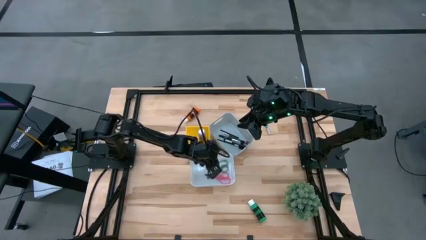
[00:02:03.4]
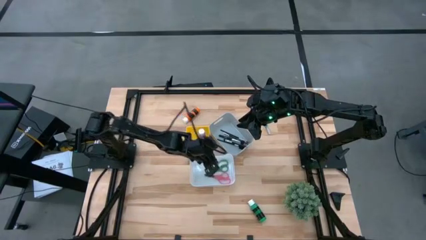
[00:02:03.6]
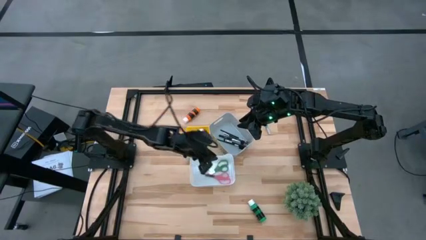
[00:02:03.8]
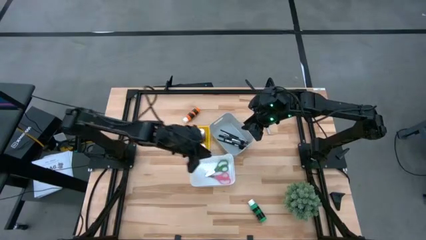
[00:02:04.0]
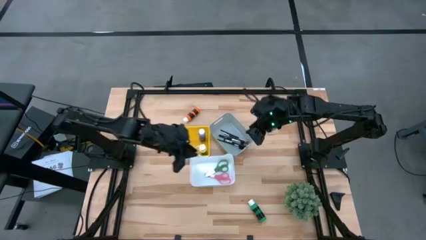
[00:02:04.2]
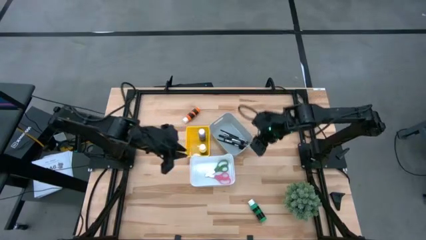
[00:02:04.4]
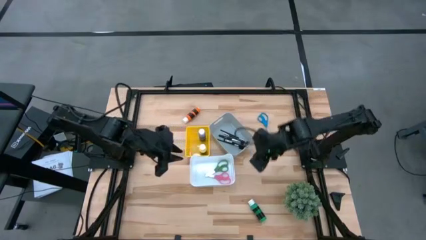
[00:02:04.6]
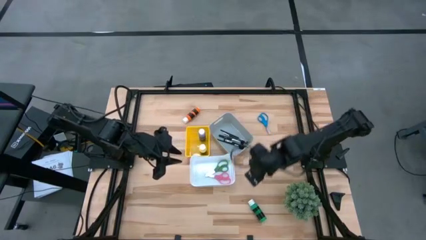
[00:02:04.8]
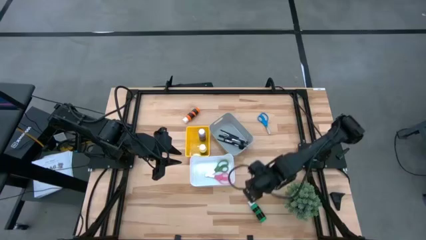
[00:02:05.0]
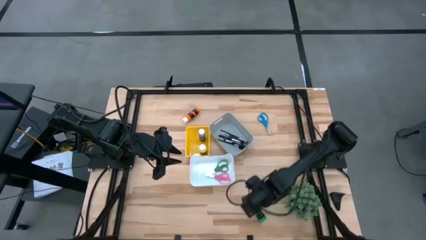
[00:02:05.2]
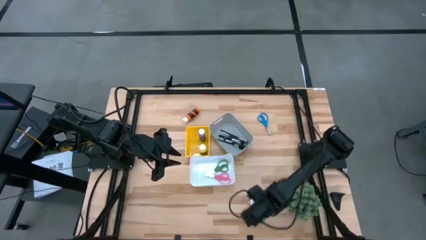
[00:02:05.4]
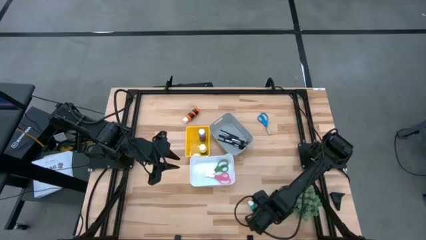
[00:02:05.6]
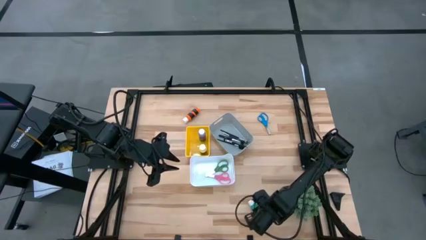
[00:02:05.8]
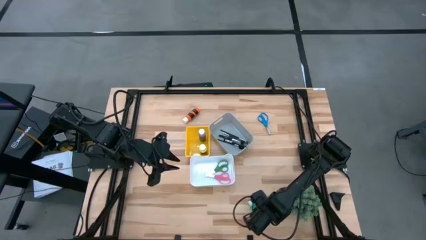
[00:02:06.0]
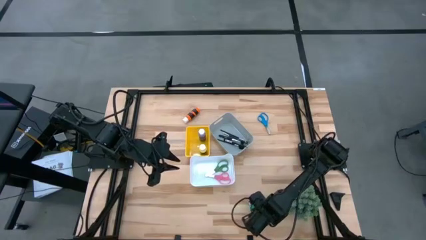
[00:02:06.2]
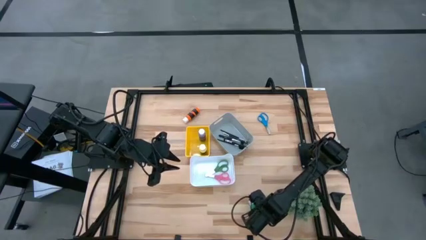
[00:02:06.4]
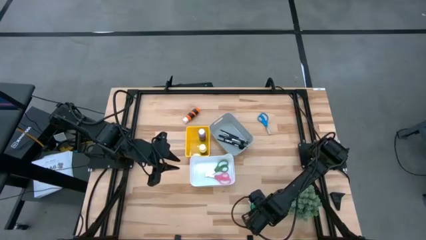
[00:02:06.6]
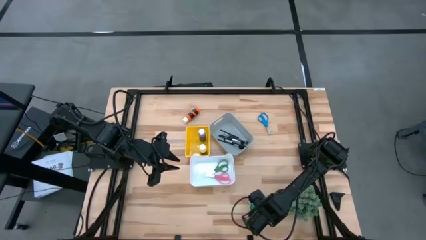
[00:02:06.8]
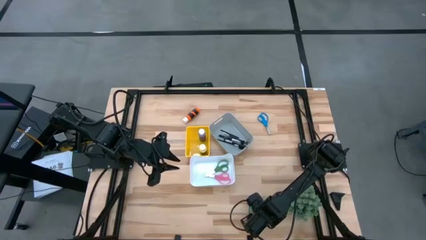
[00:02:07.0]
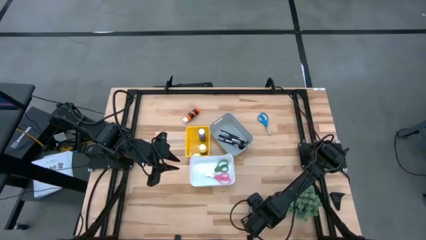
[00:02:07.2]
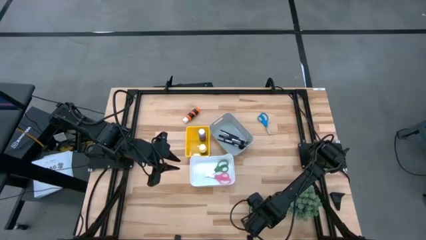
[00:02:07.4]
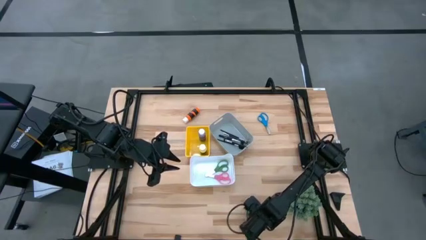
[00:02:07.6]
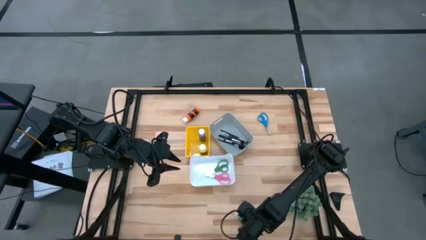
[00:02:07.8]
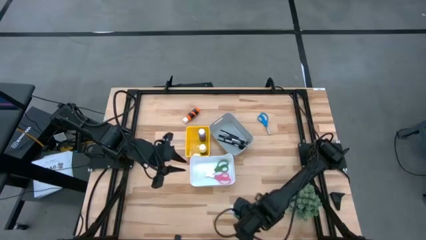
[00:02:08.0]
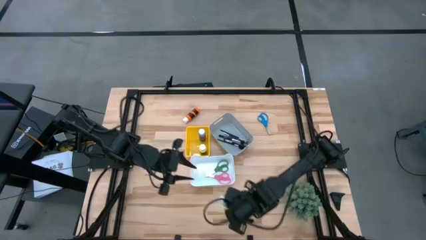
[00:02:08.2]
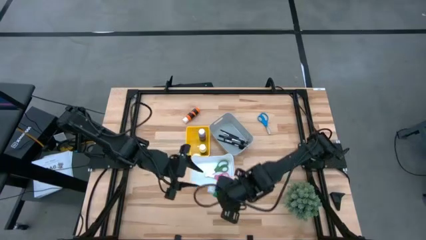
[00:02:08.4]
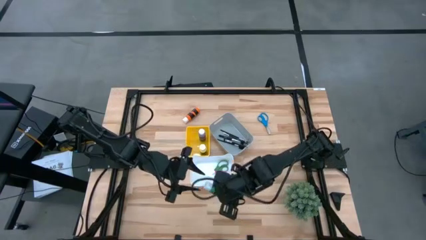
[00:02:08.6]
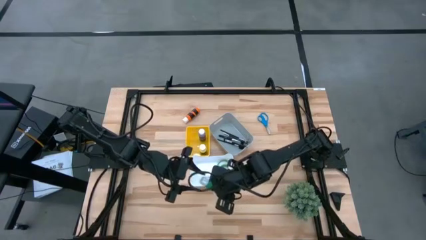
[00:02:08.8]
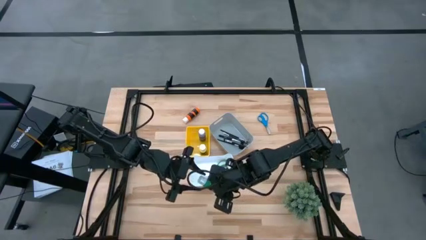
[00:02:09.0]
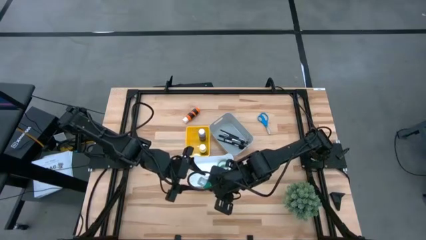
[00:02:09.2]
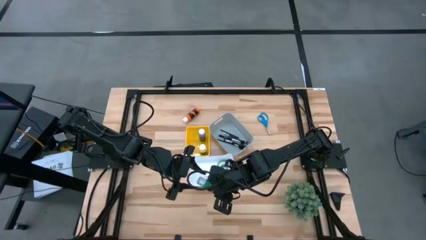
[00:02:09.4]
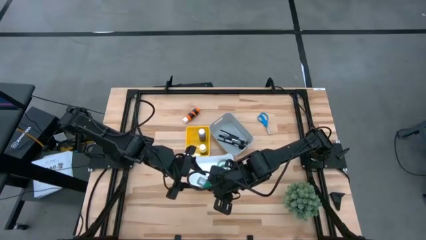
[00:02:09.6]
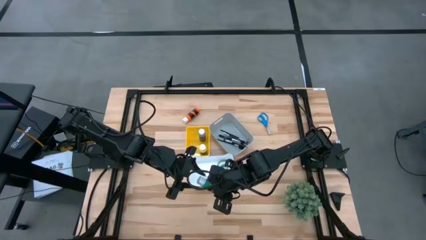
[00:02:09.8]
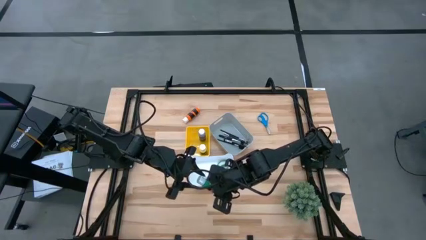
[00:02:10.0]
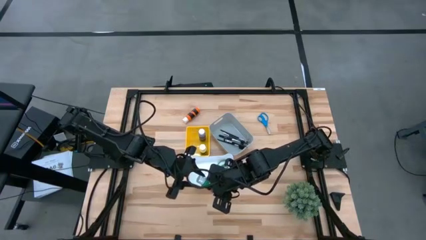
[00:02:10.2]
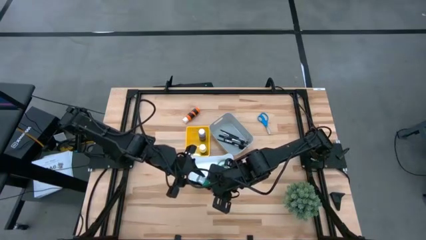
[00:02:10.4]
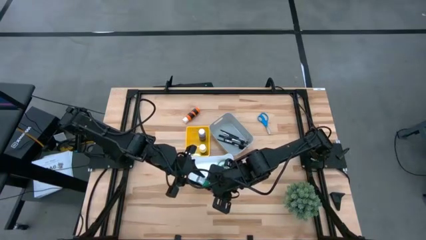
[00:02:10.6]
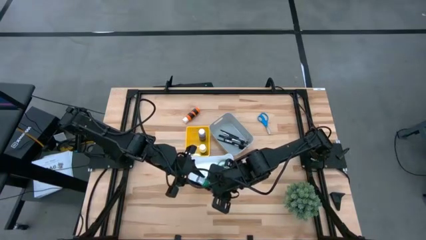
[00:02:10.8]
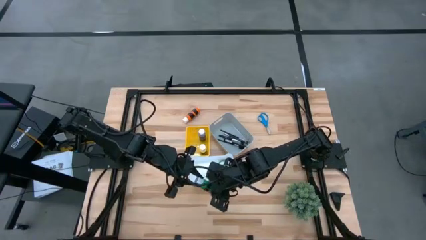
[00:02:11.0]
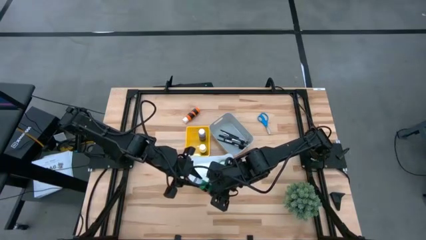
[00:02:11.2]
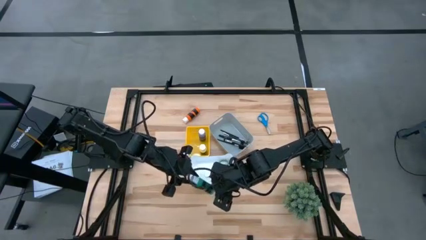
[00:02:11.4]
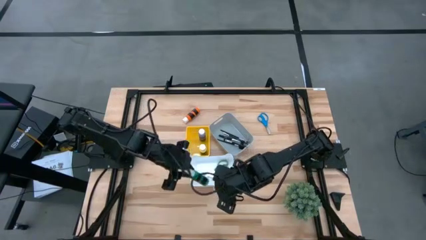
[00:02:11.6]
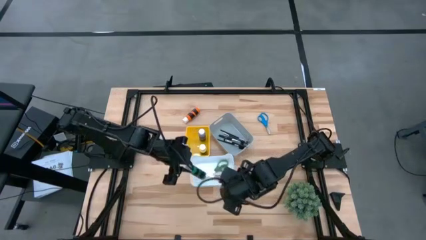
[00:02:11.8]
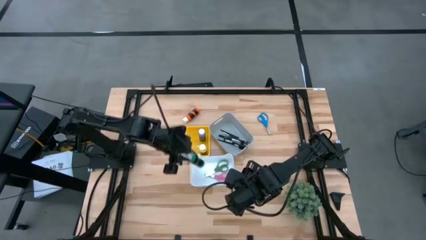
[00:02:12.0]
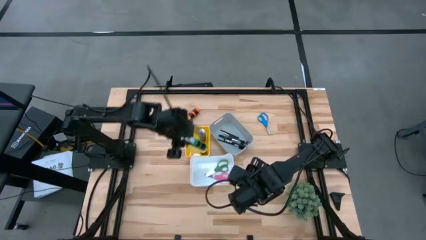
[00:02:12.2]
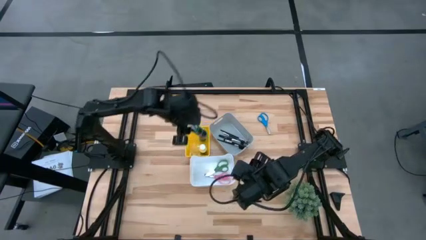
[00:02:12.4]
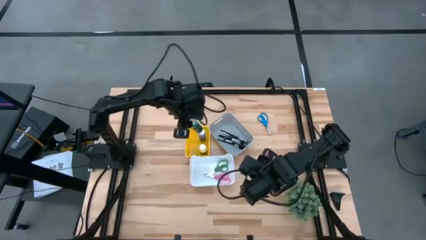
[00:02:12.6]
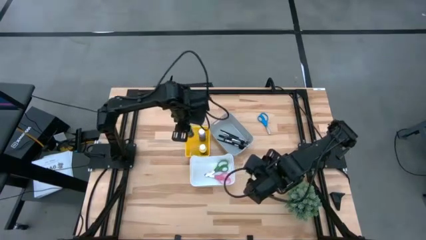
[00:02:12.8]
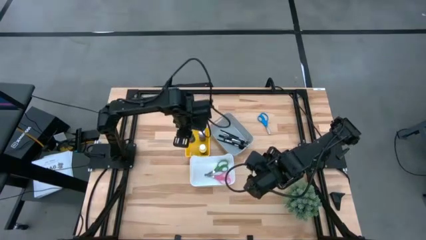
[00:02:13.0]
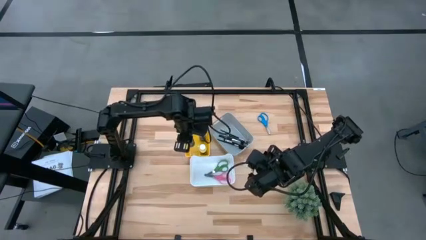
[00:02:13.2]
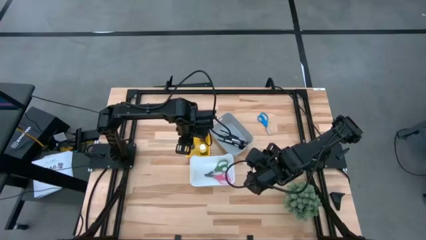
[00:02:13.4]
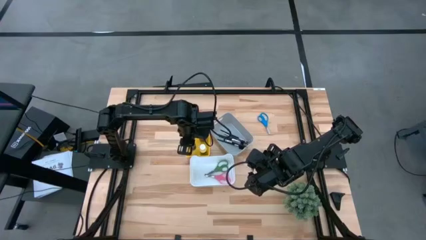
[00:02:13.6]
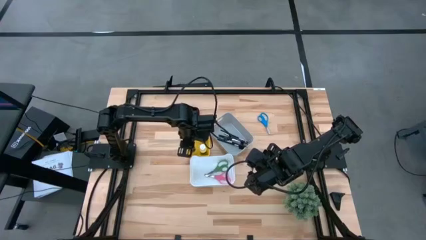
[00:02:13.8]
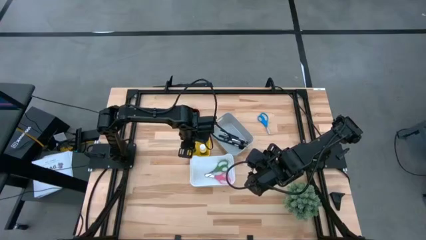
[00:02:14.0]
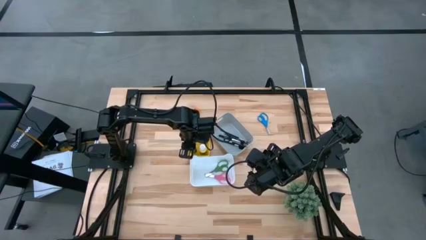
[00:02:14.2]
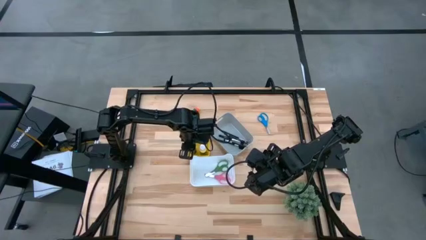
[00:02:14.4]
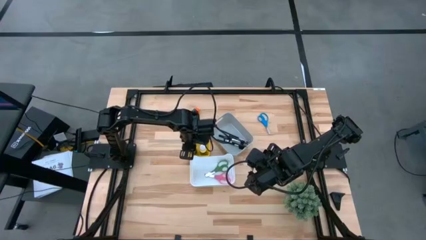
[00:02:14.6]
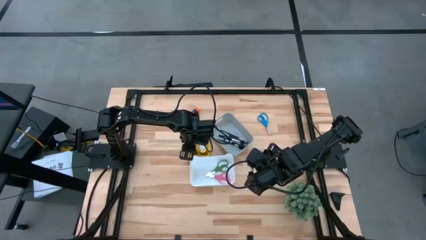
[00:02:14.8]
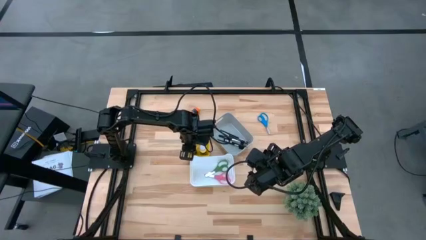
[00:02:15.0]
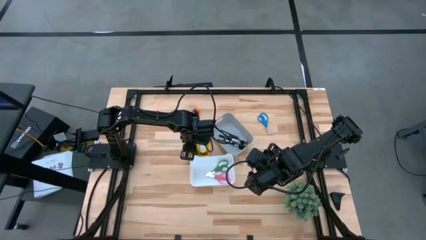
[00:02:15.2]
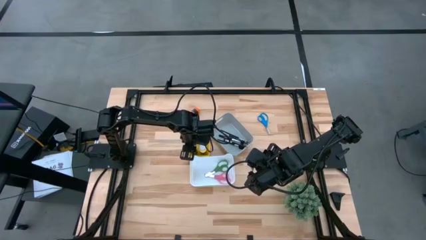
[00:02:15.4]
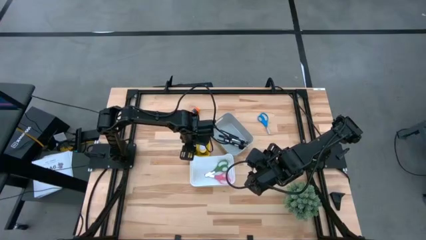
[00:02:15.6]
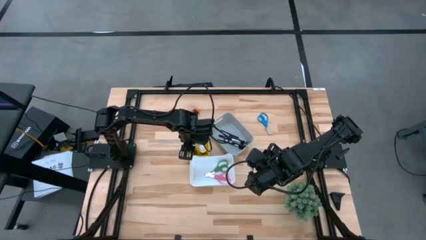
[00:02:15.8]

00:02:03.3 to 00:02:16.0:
Task: Pick & Place Paint Supplies
Put the green paint bottle into the yellow bin

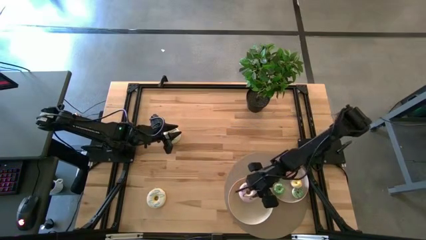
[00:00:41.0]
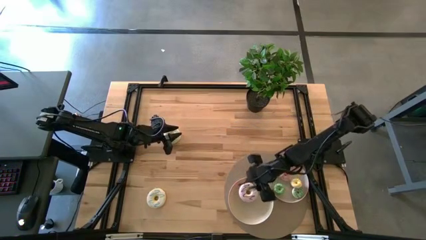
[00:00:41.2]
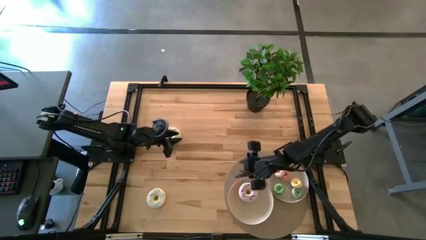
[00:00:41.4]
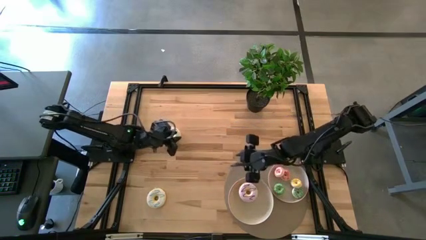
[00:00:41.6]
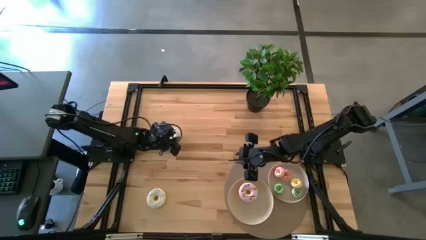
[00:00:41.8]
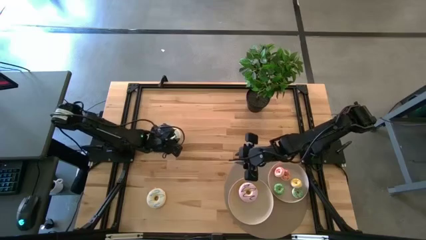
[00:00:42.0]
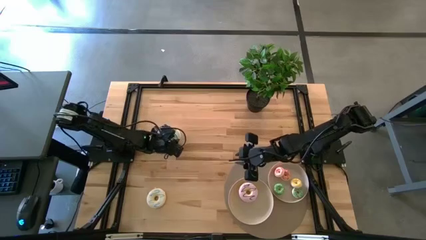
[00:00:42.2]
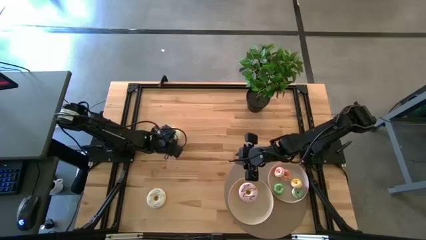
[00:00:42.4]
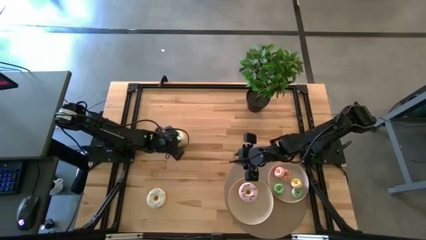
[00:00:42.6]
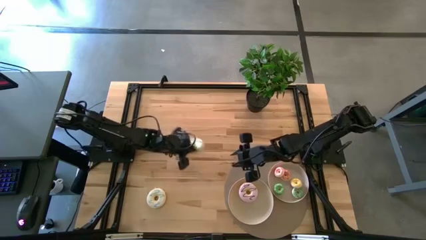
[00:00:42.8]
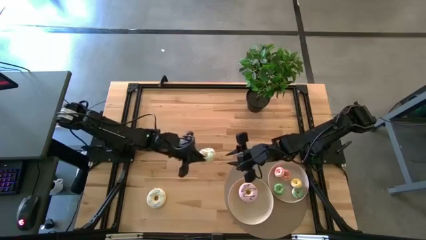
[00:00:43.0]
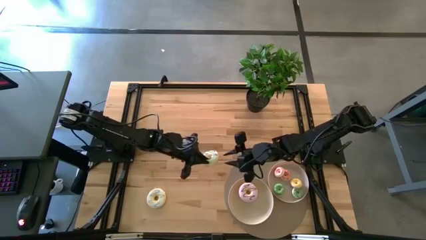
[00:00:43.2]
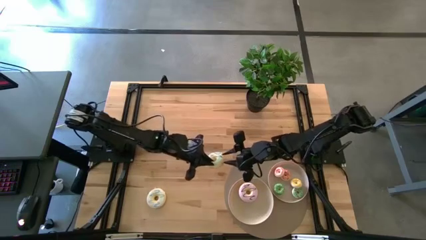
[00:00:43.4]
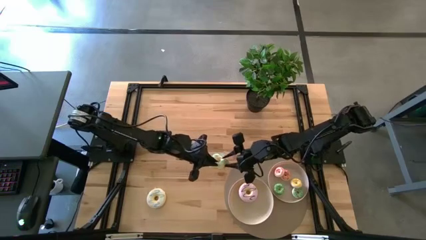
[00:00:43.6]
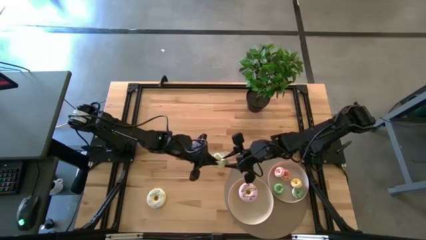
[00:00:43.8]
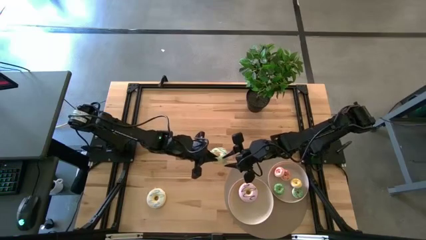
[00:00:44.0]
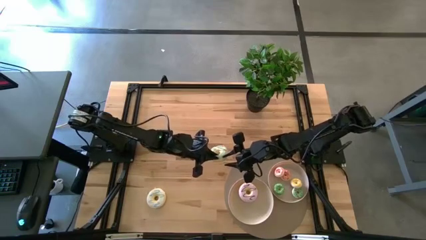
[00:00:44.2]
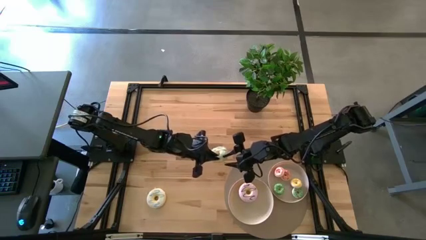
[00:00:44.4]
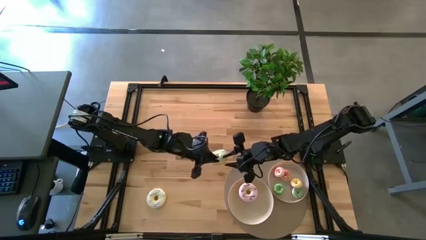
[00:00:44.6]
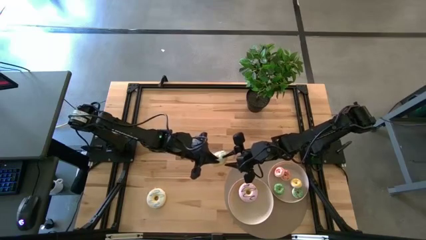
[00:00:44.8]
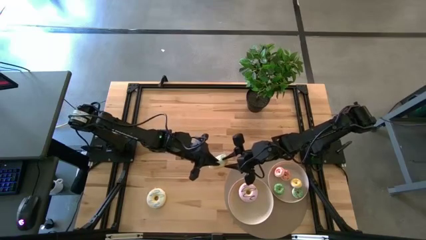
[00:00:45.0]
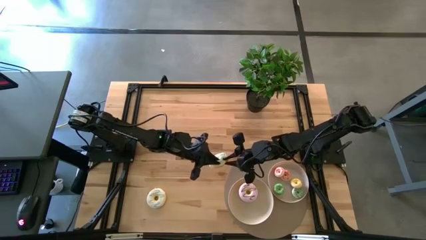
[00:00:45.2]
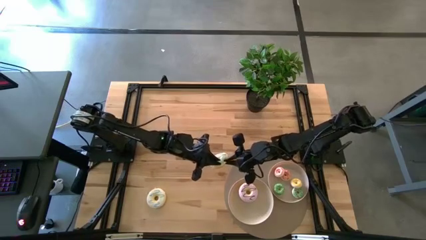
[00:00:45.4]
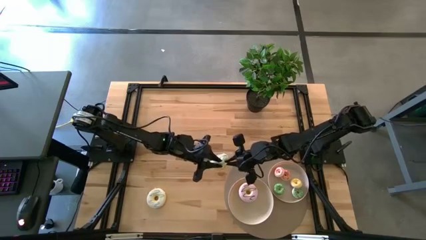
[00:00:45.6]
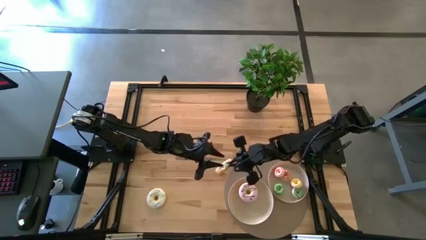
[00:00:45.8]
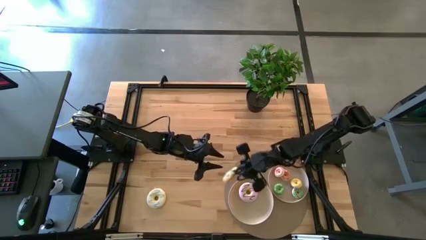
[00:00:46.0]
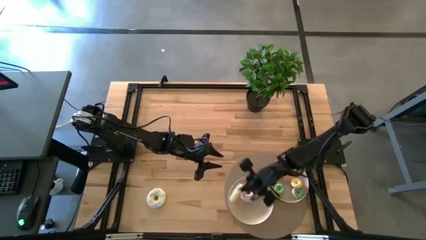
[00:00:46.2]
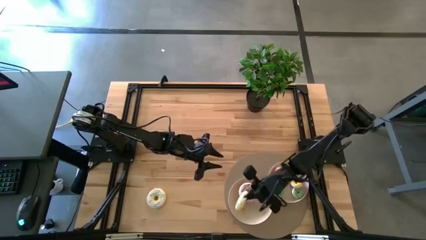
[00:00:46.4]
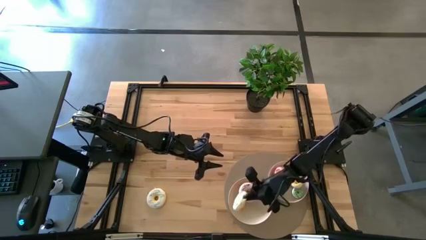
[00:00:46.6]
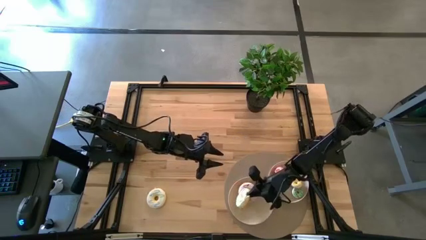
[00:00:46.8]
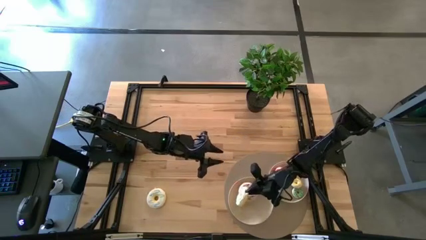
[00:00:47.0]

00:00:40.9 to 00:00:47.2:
Task: Pick & Place donuts
Put the big blue donut into the left white plate
